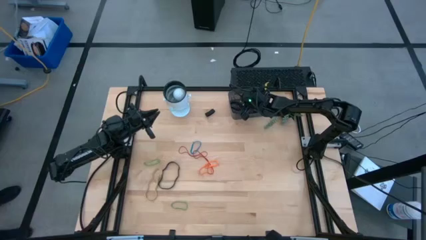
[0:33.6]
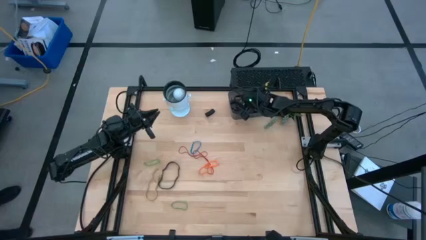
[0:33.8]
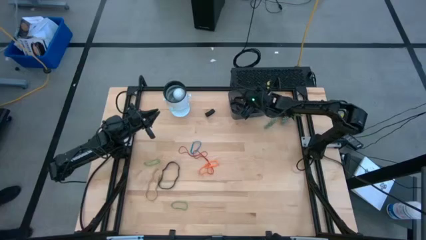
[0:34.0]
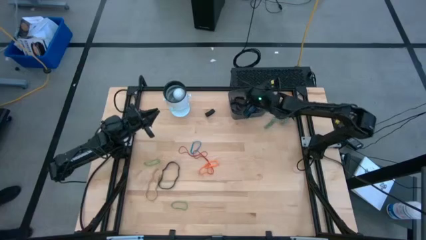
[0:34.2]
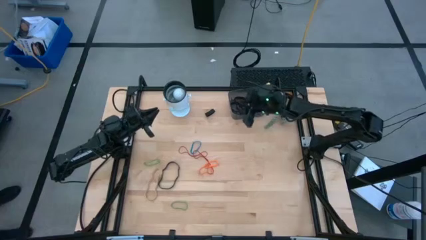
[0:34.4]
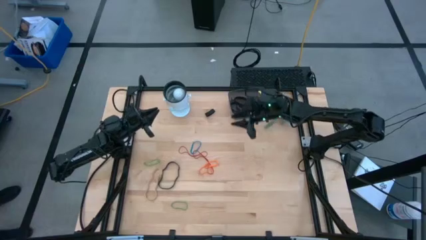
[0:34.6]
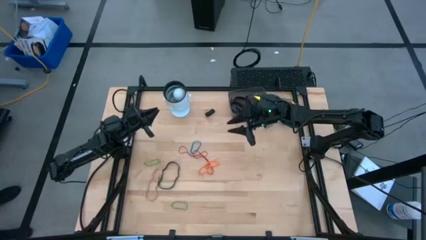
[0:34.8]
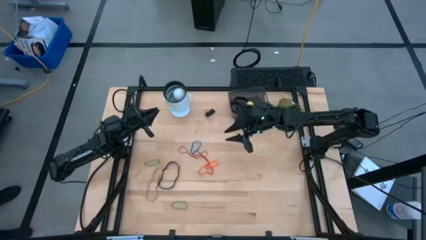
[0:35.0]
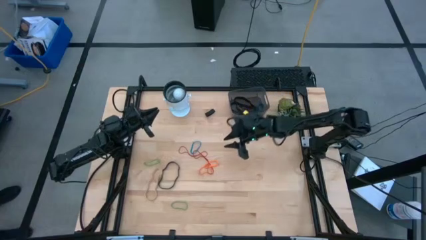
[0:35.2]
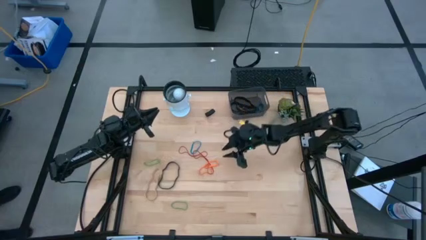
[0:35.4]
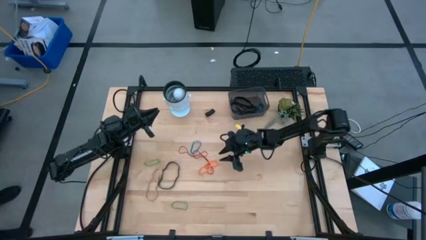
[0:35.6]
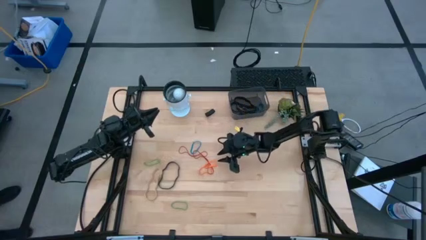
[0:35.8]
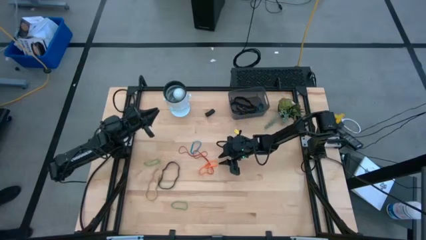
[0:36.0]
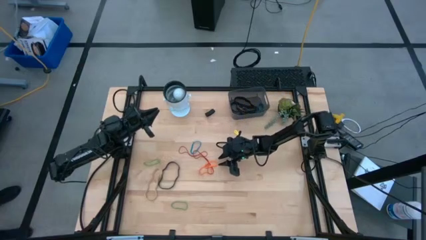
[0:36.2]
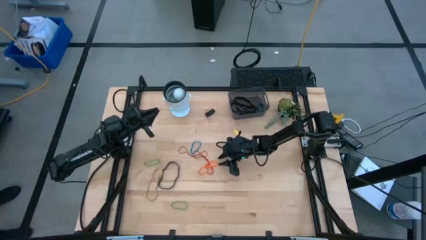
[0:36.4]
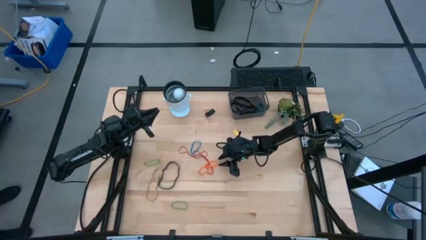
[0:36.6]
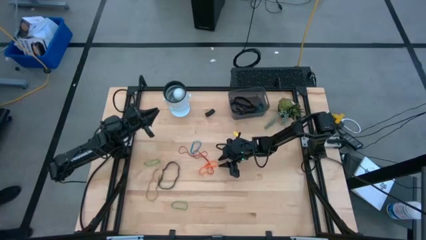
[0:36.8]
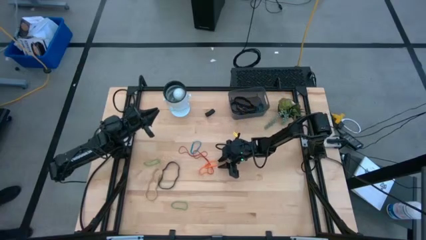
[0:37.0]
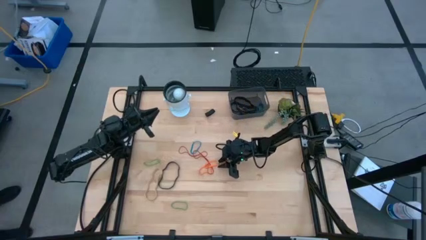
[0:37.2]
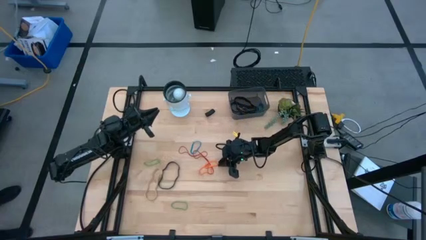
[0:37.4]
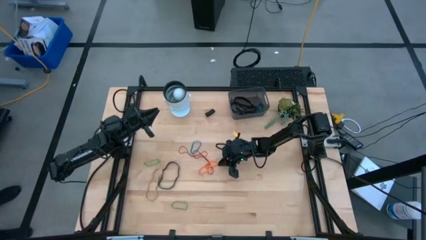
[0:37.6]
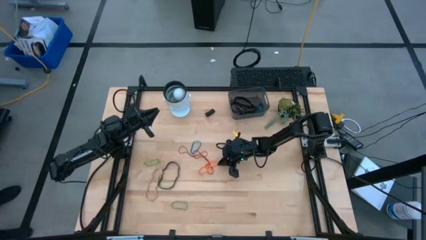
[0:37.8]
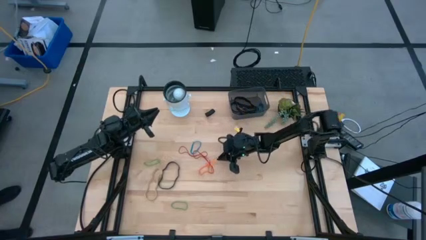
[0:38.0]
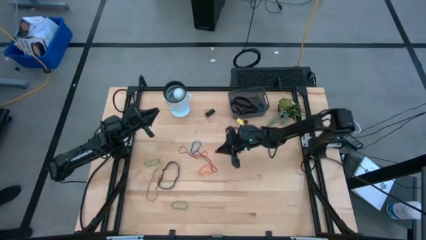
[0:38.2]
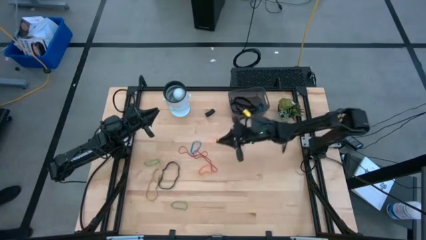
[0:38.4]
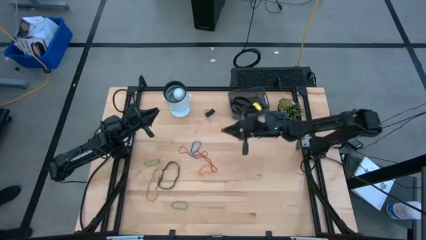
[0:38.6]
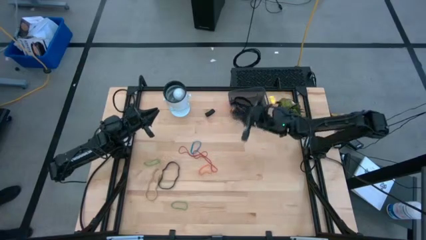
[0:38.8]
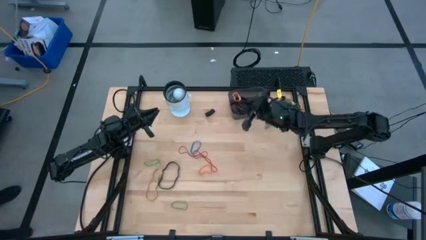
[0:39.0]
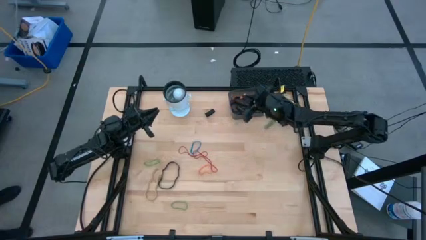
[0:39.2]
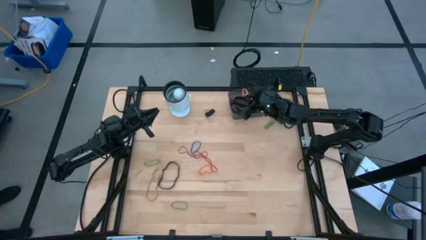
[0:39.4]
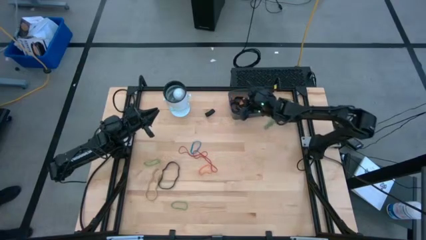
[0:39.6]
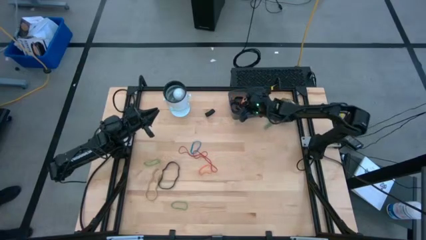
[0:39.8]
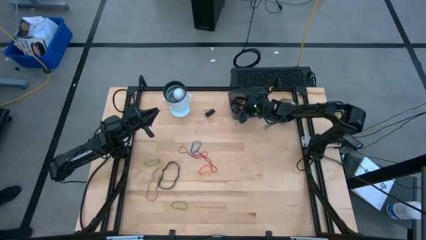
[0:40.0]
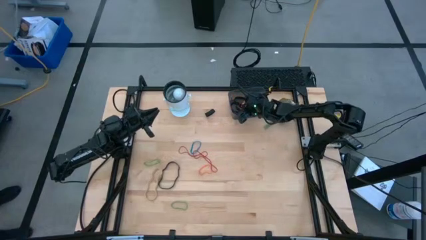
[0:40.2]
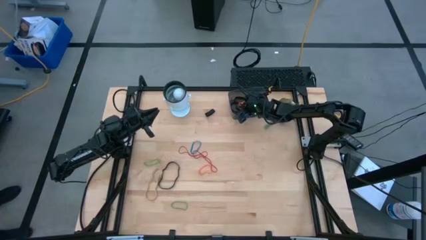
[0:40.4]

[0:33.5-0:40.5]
Task: Pick and place rubber bands into bin
Put the orange rubber band into the black bin

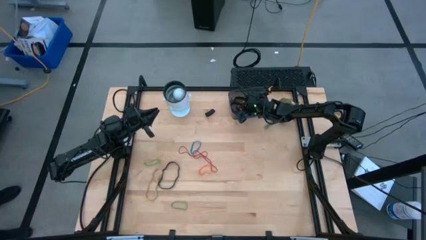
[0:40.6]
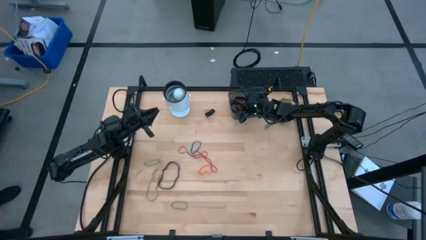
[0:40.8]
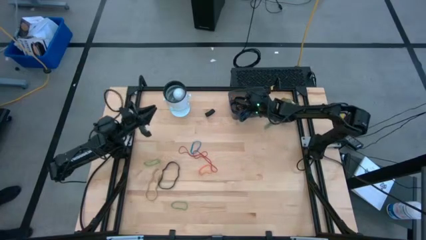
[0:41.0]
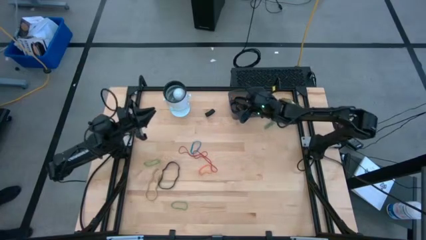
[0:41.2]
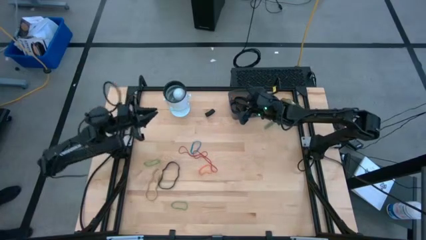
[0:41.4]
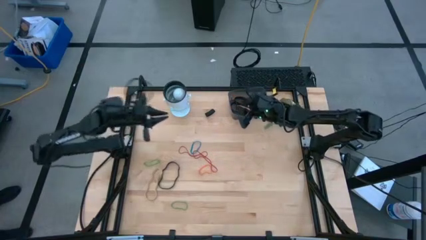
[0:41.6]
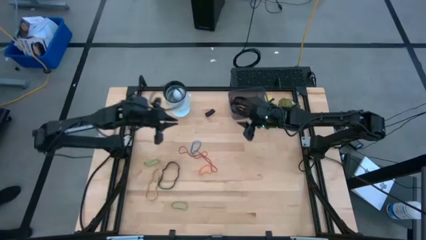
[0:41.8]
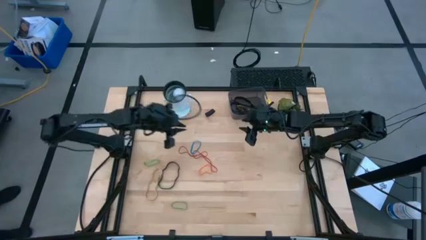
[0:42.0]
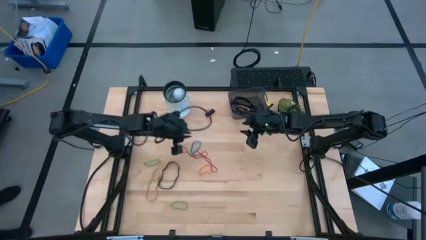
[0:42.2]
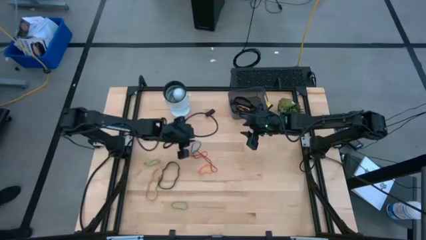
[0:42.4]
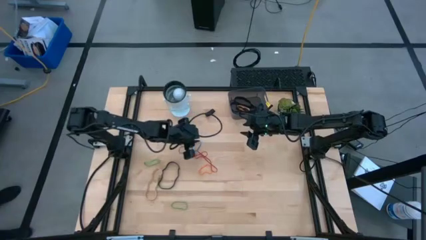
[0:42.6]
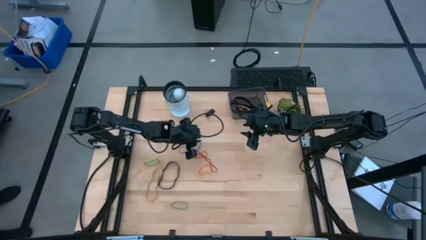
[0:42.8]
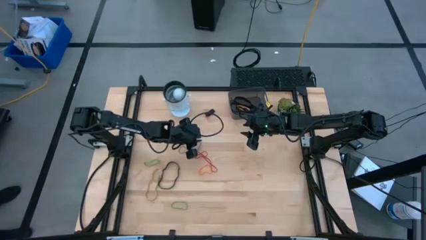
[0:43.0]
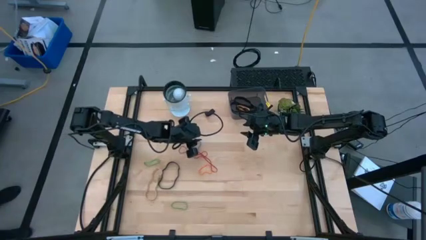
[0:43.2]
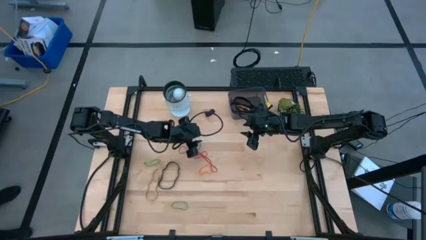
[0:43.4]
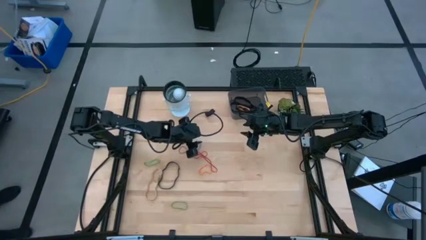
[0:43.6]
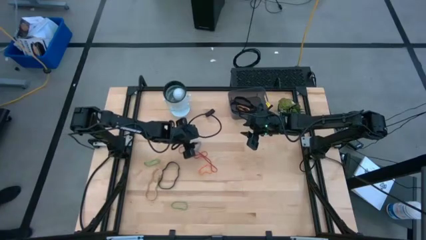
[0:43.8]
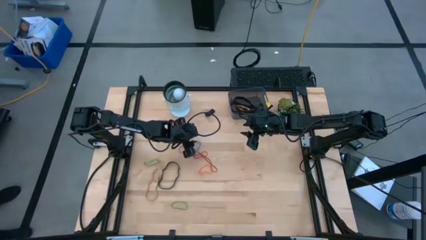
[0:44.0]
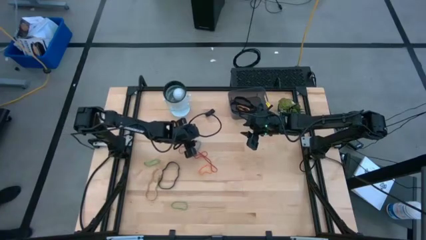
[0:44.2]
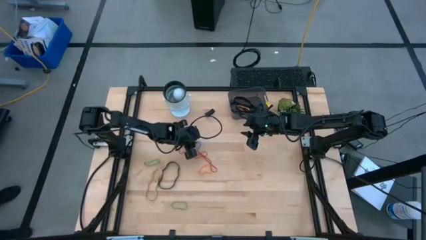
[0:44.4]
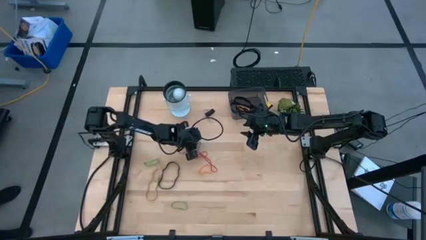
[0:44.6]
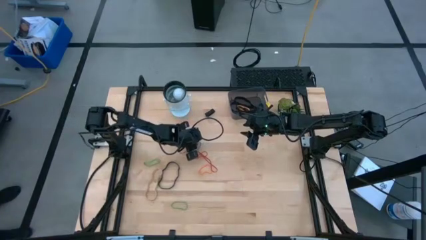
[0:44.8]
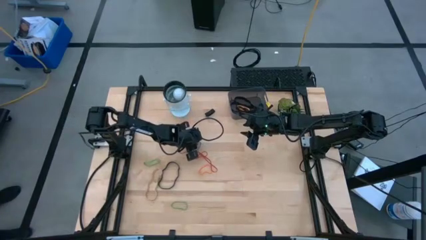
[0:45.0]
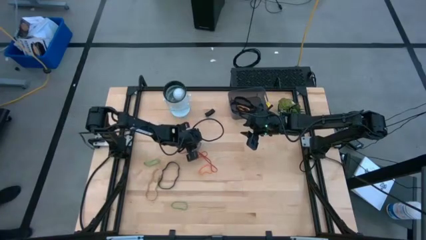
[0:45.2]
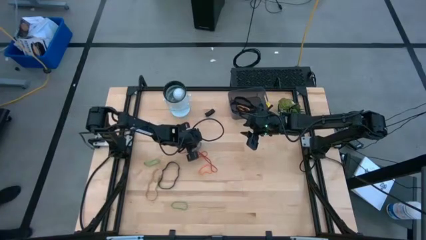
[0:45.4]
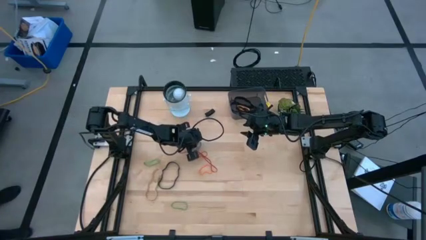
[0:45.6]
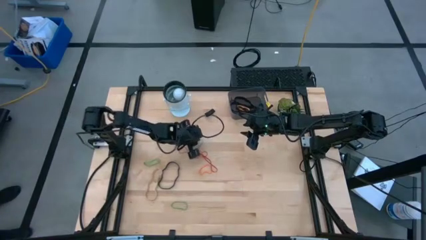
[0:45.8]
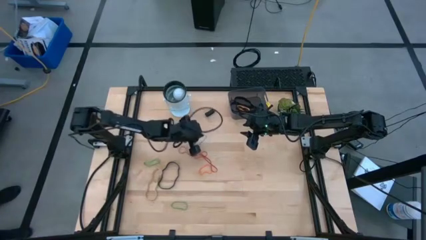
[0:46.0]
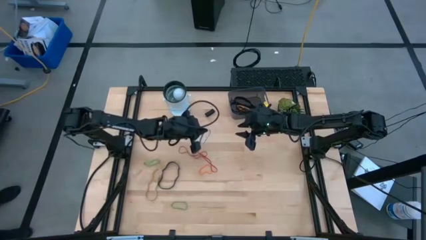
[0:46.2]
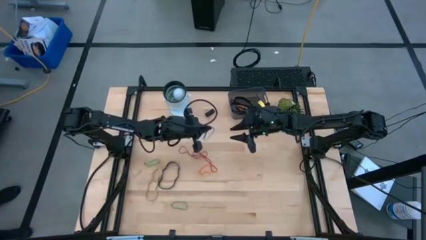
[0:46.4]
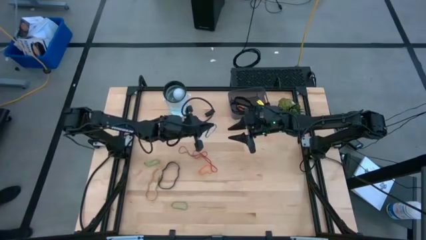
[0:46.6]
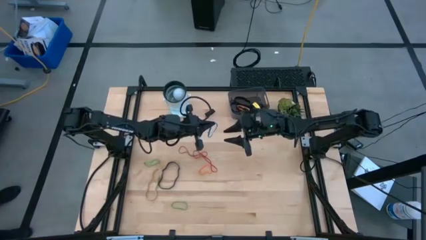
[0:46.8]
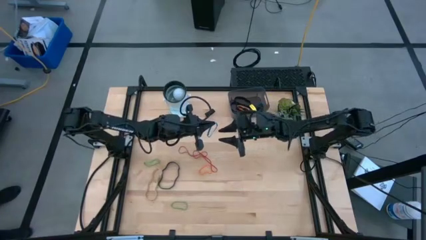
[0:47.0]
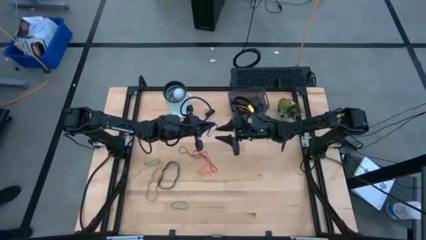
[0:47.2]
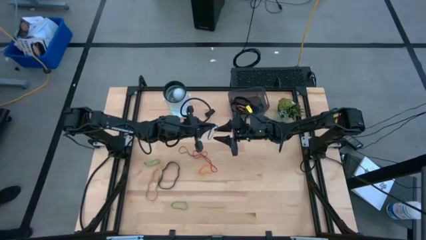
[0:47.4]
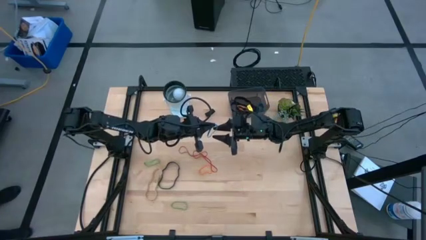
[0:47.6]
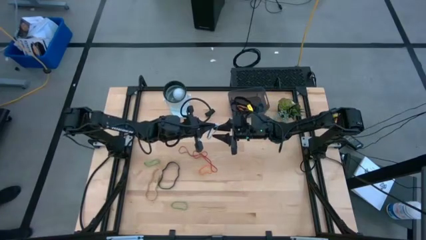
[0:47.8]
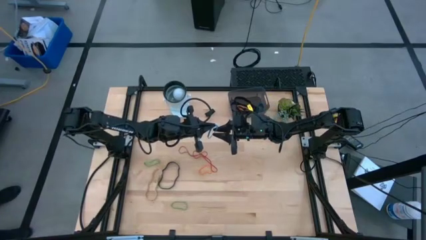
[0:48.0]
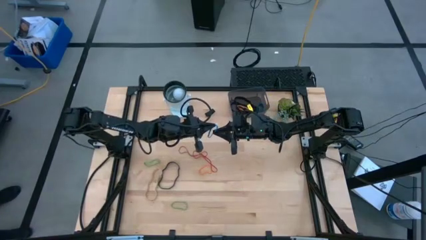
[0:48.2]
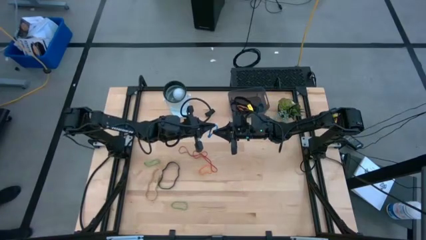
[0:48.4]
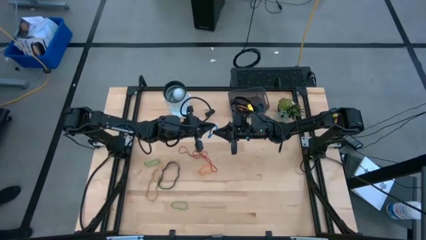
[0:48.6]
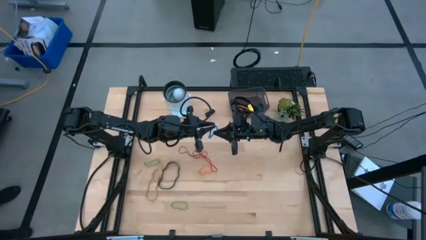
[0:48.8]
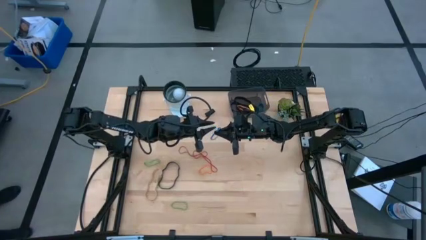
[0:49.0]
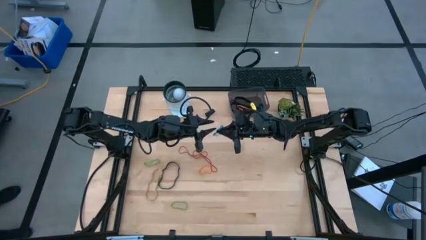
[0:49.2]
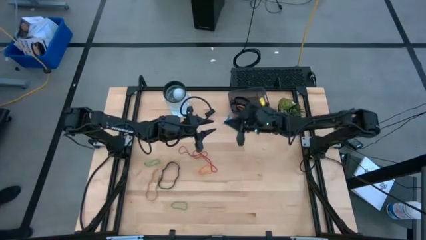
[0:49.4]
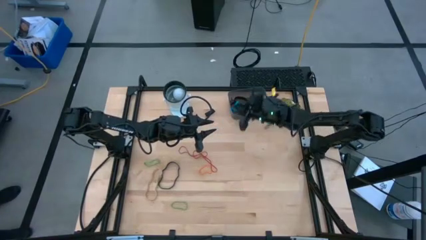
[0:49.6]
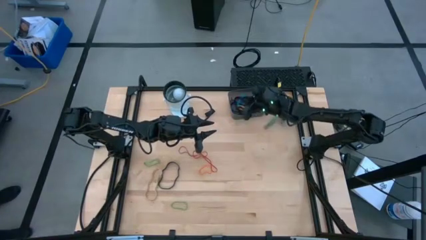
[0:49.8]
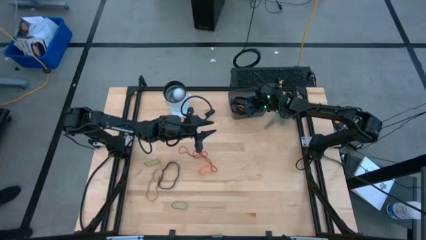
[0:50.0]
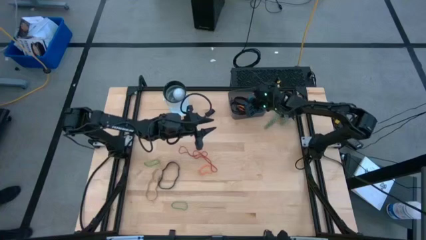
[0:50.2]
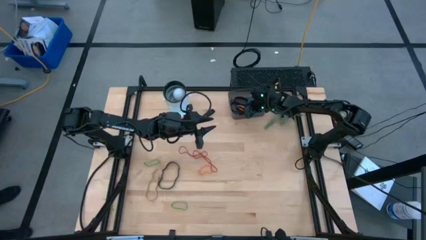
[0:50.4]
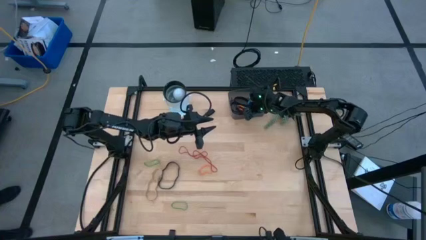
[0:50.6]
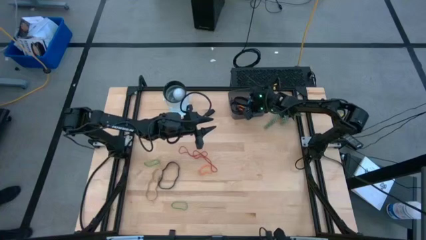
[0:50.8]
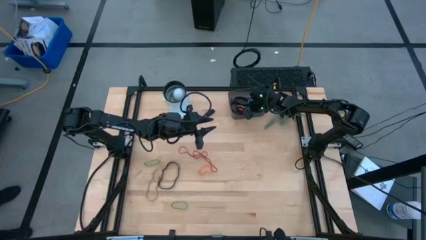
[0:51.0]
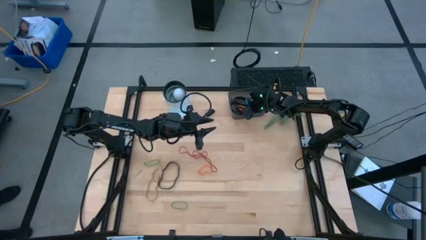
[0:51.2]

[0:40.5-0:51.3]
Put the blue rubber band into the black bin
